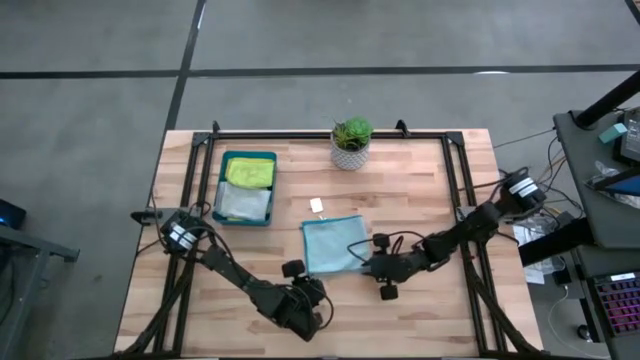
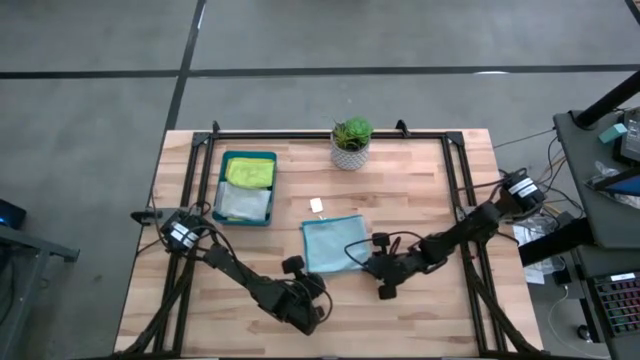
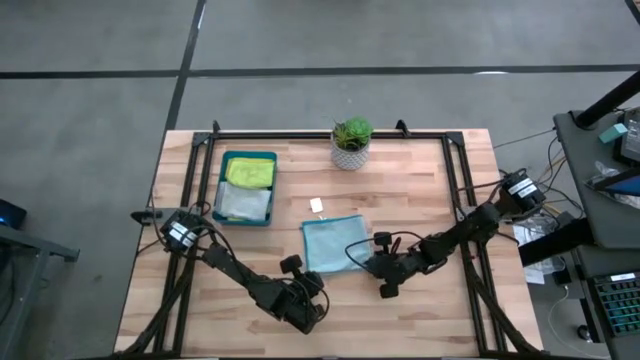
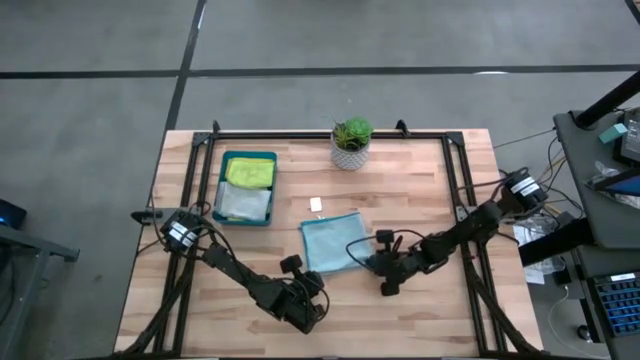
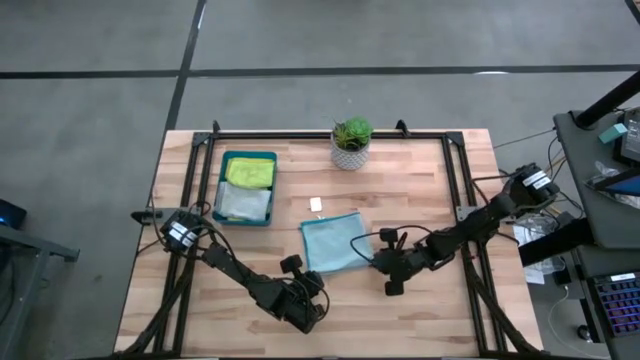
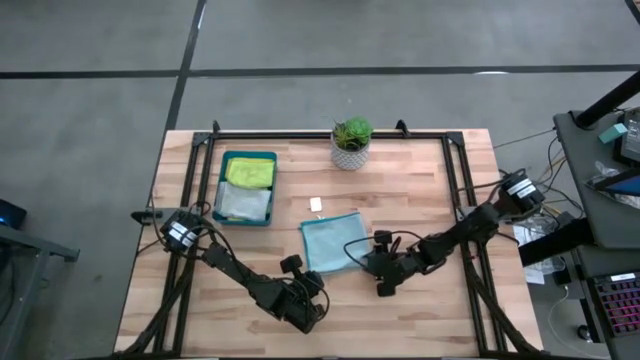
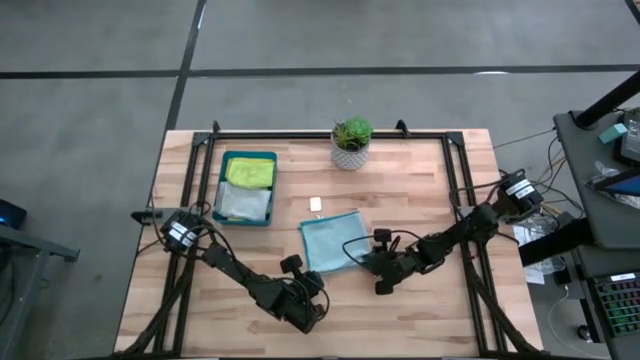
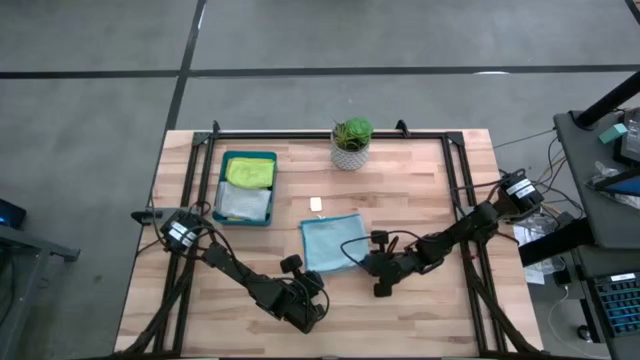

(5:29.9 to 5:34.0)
Task: Fold microfiber towels
Fold the blue towel

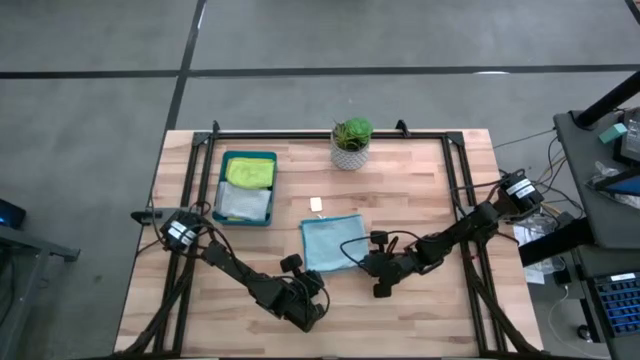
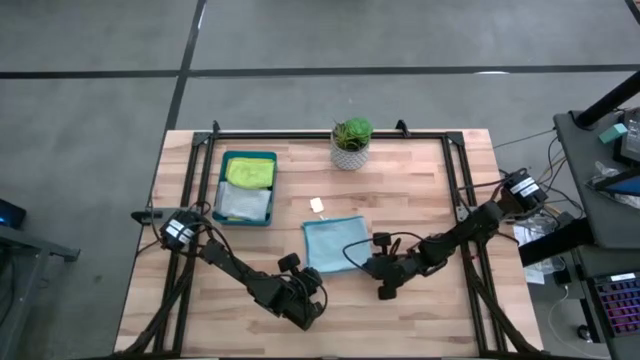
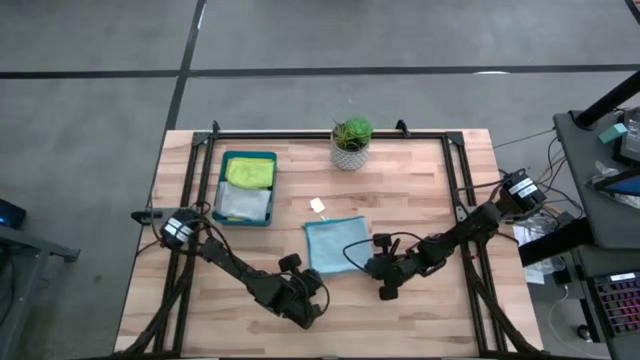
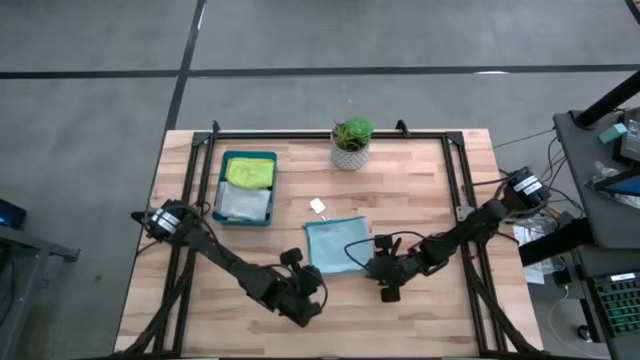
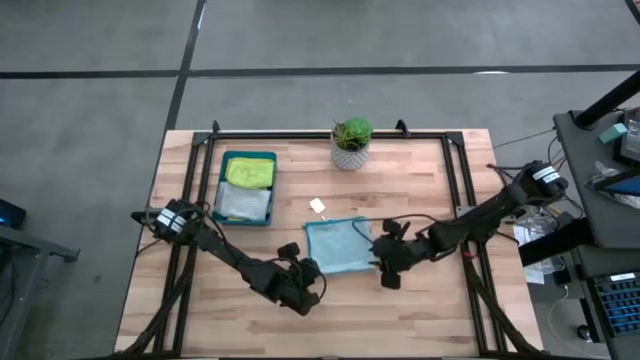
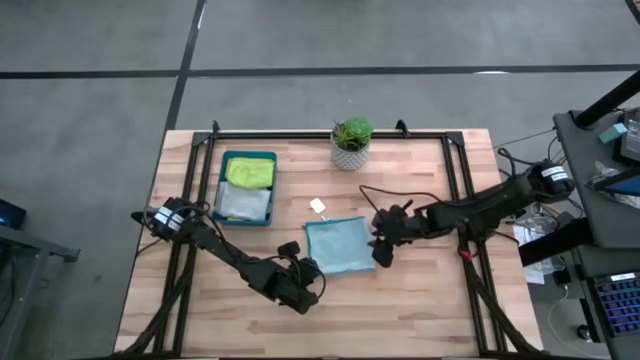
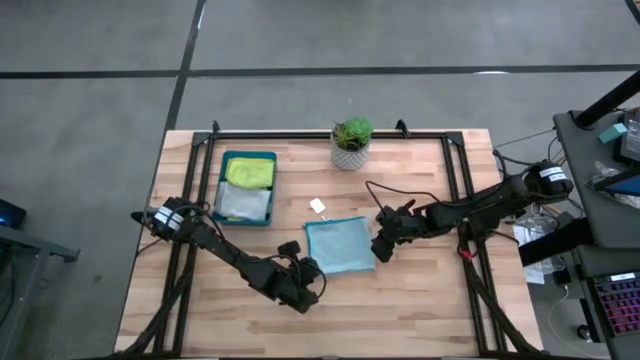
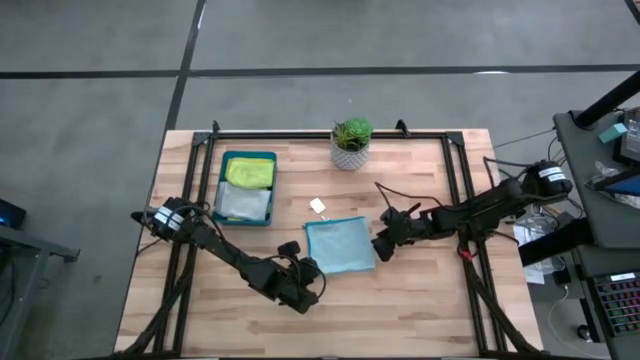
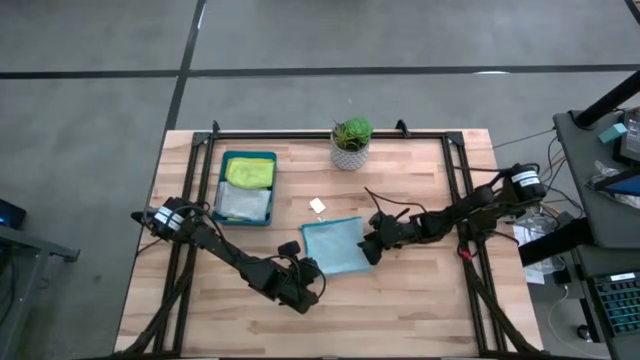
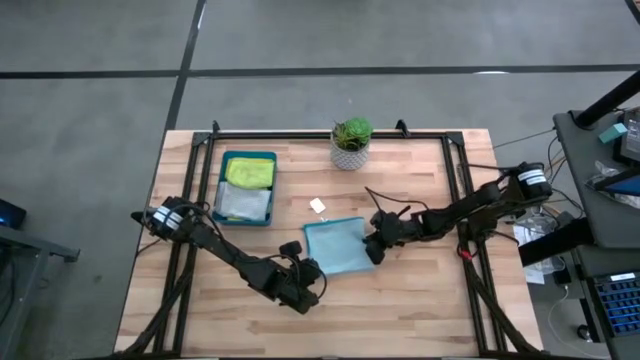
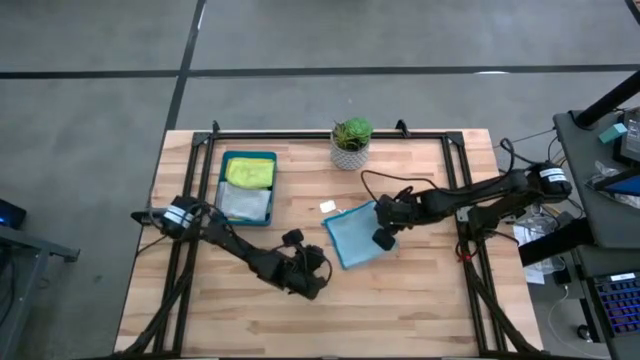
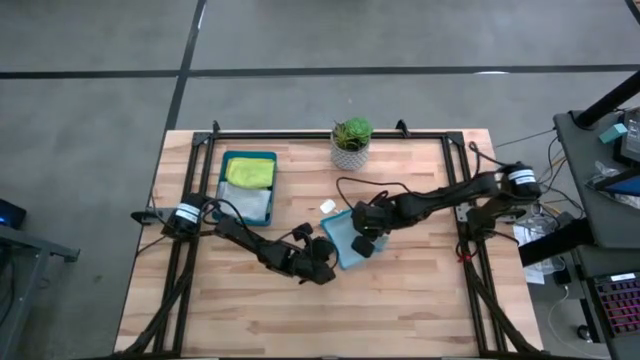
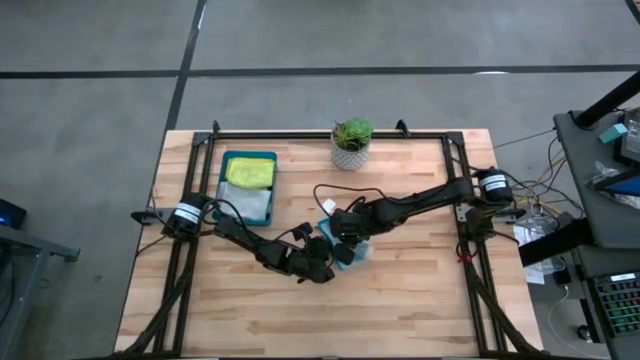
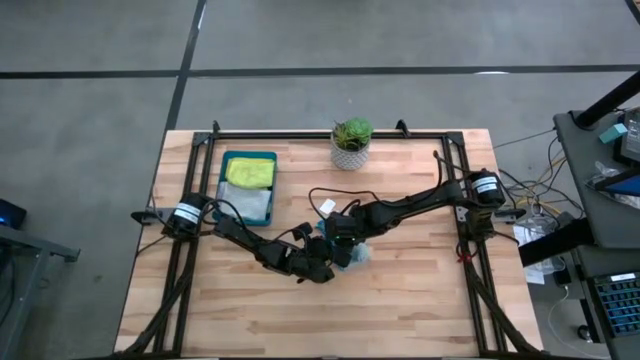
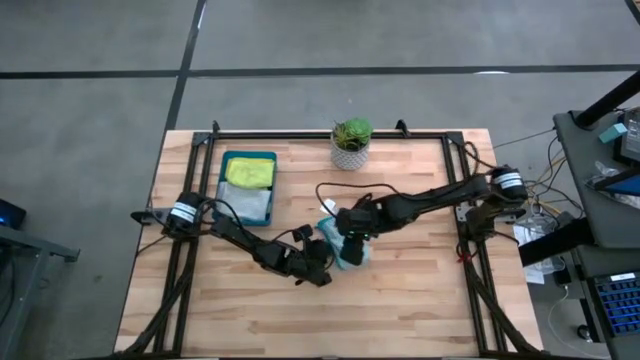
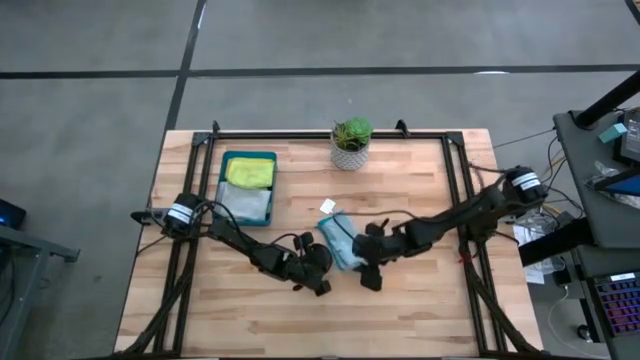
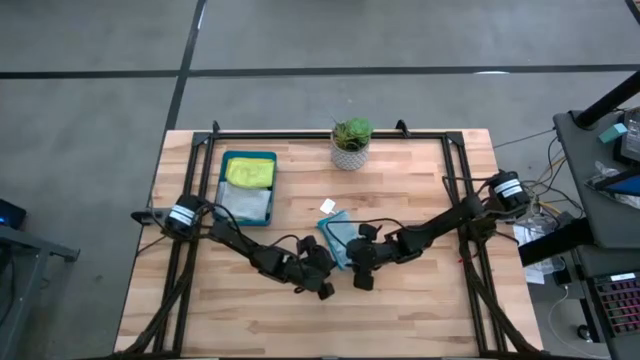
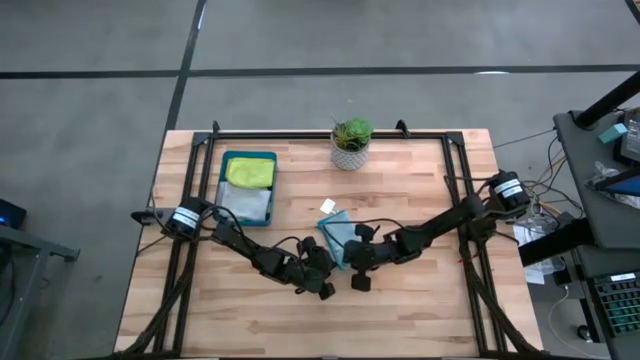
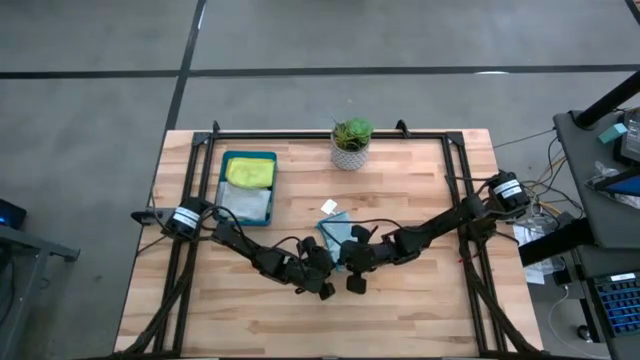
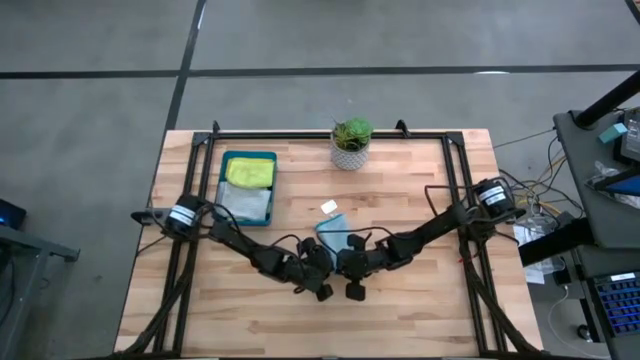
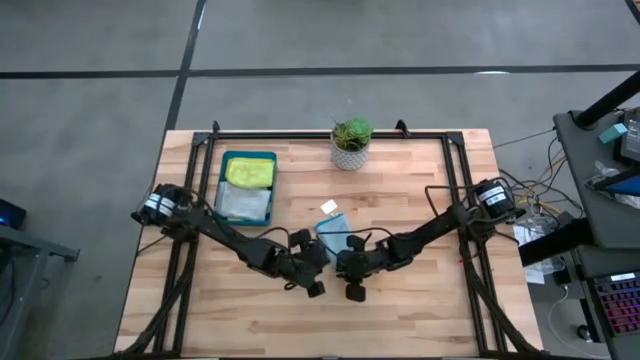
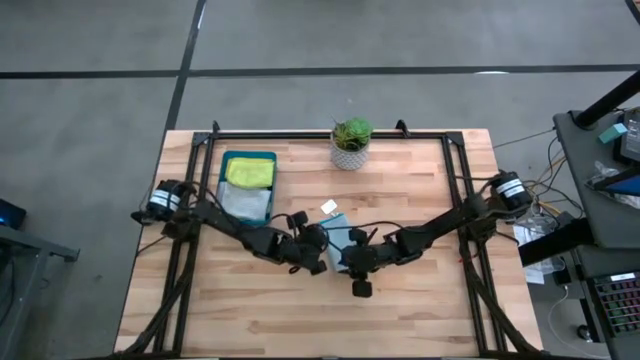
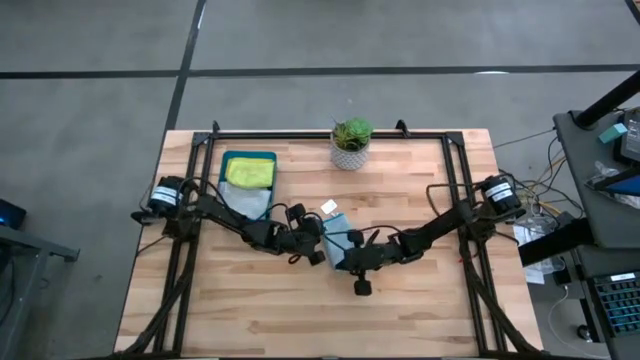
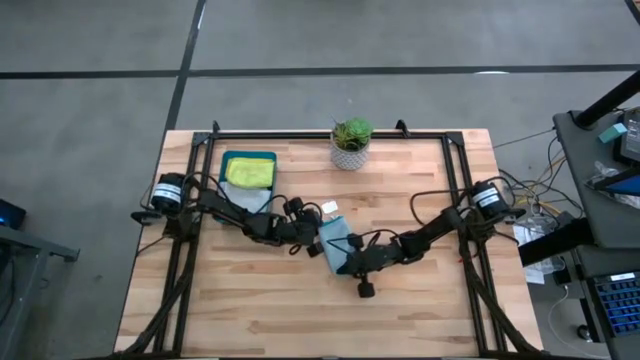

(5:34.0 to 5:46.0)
Fold the blue towel

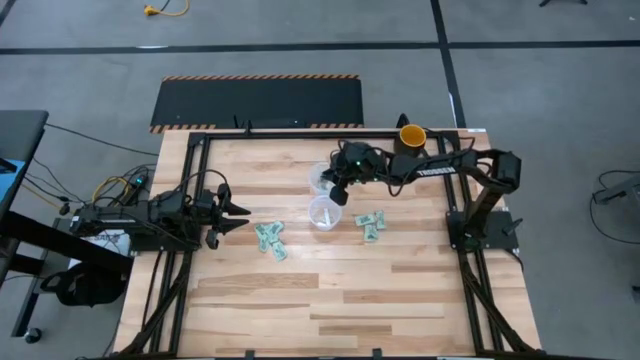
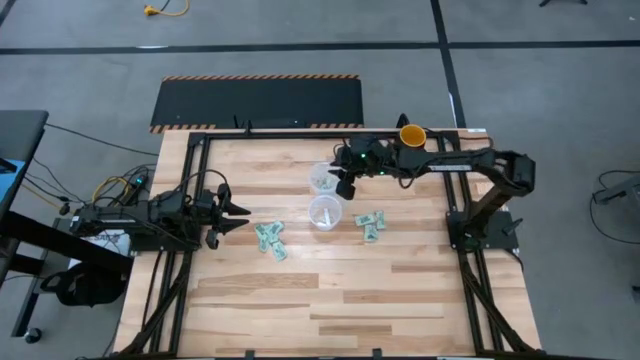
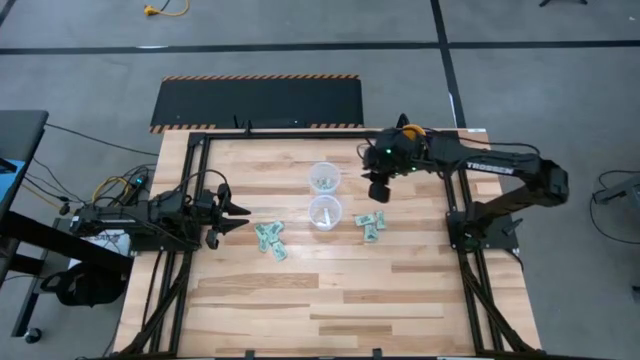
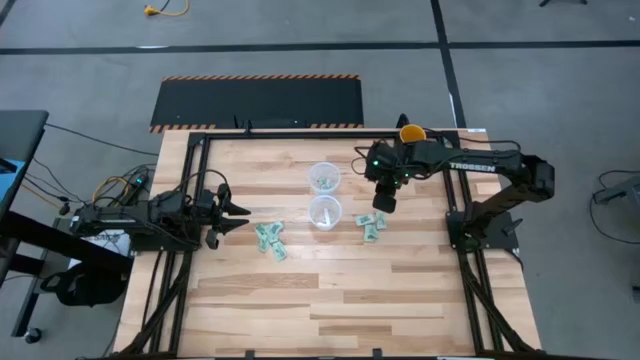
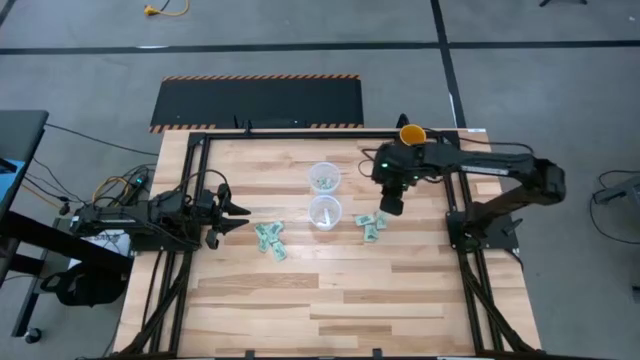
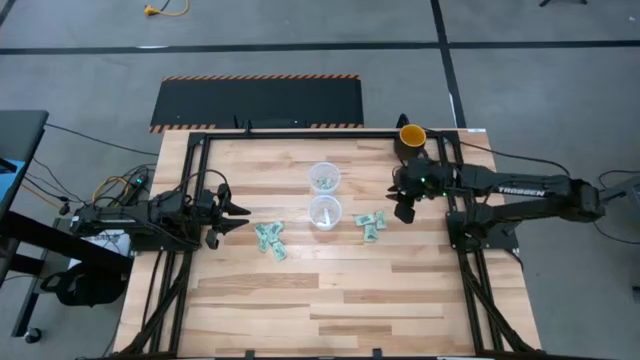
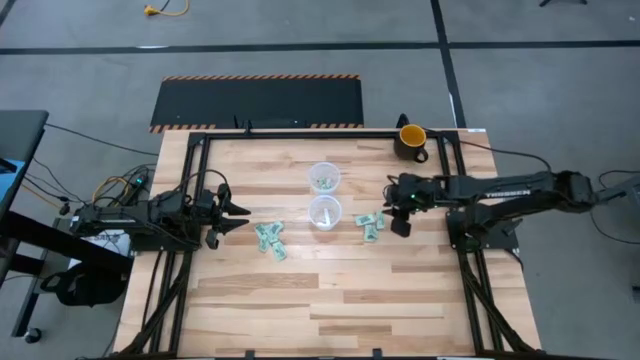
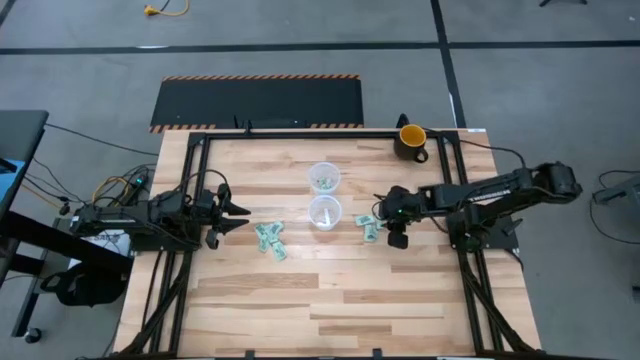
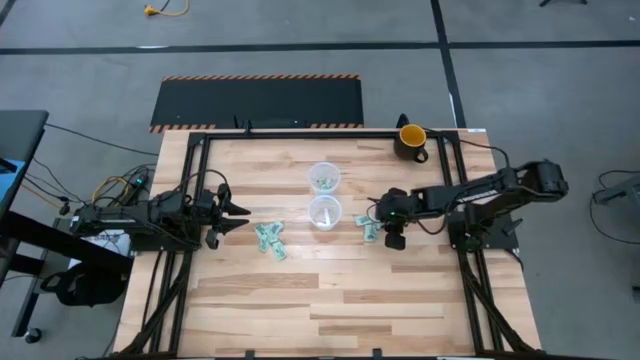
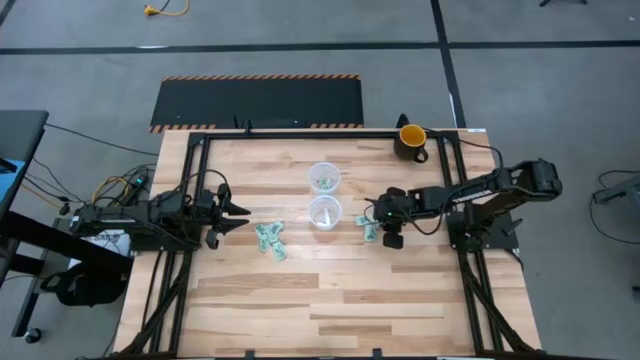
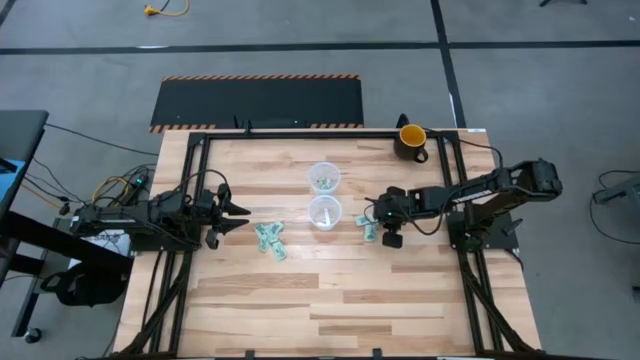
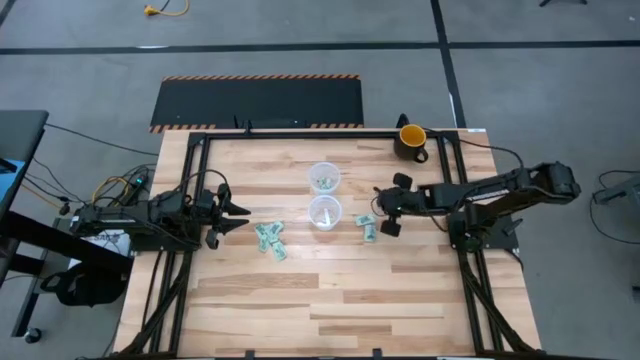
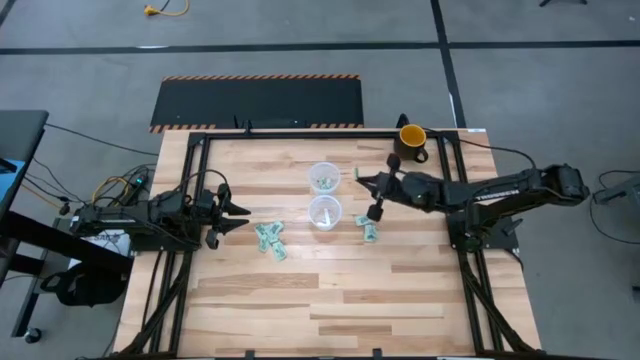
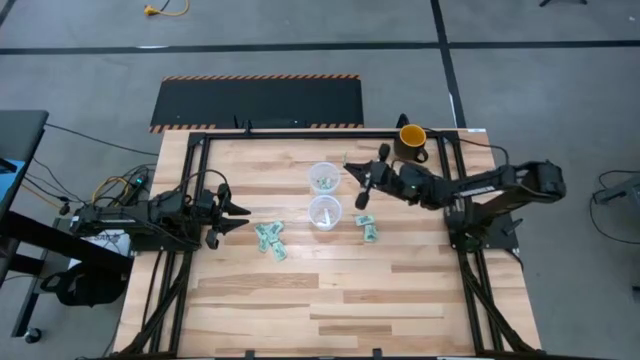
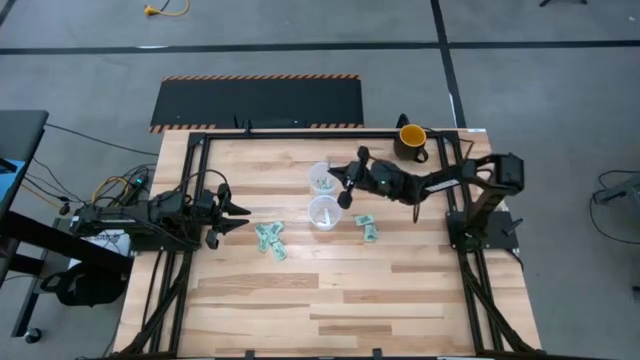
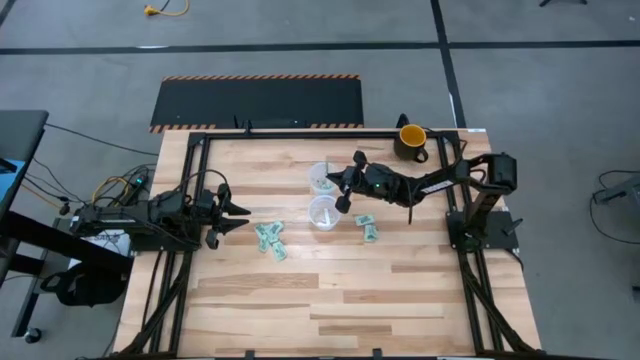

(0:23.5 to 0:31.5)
Task: Pick and place items into bin
Put the green stevia packet into the top transparent bin
